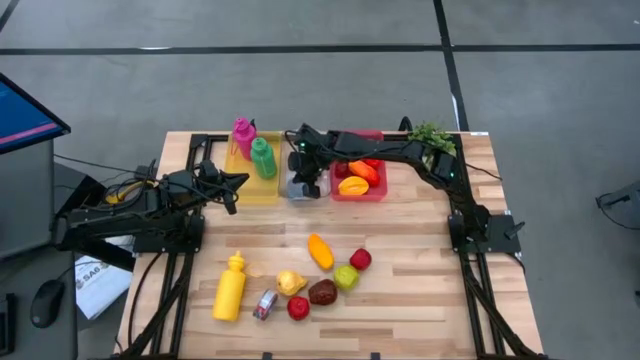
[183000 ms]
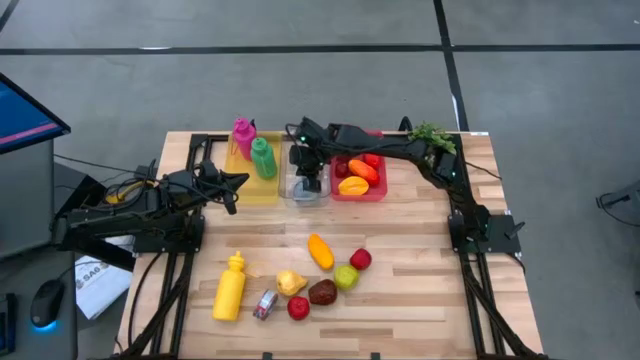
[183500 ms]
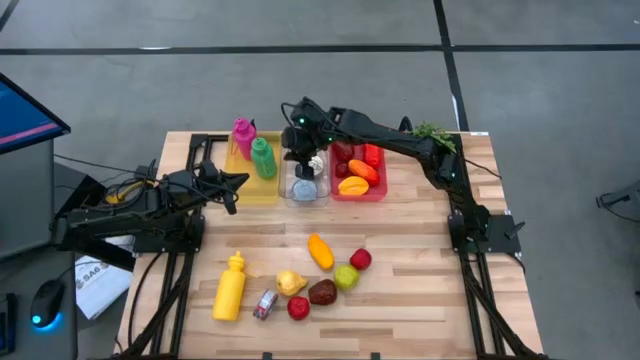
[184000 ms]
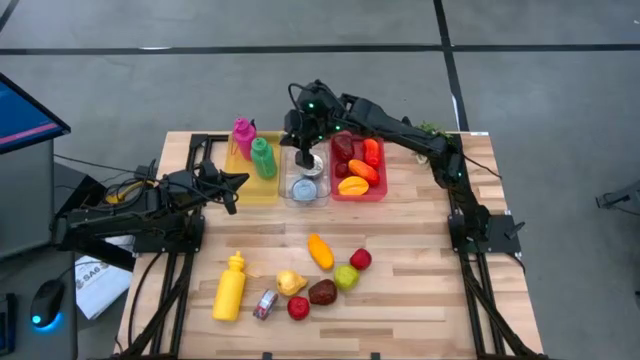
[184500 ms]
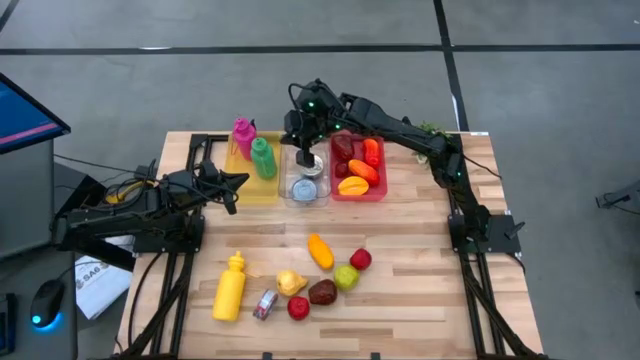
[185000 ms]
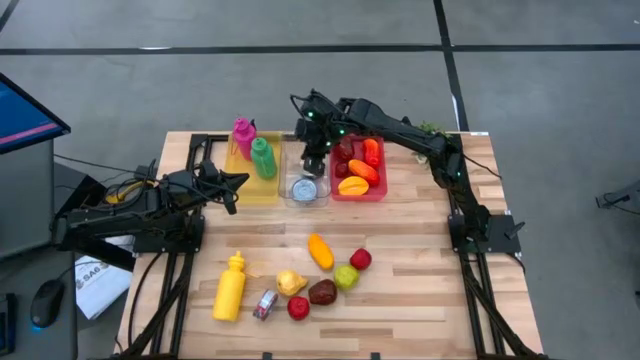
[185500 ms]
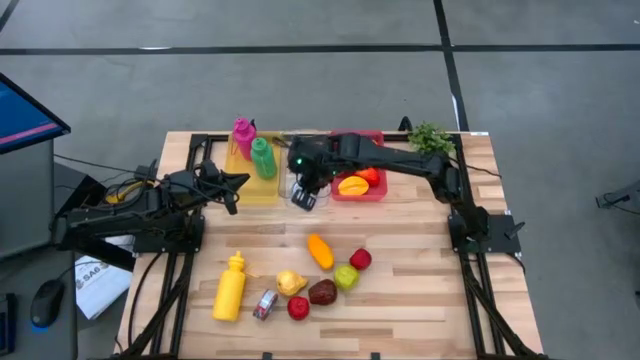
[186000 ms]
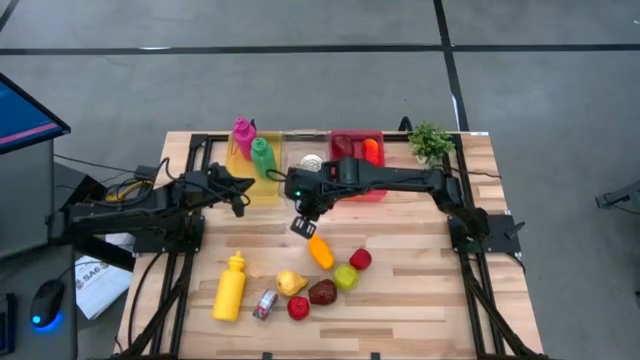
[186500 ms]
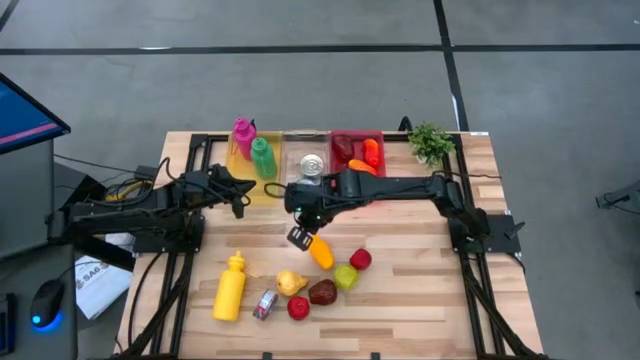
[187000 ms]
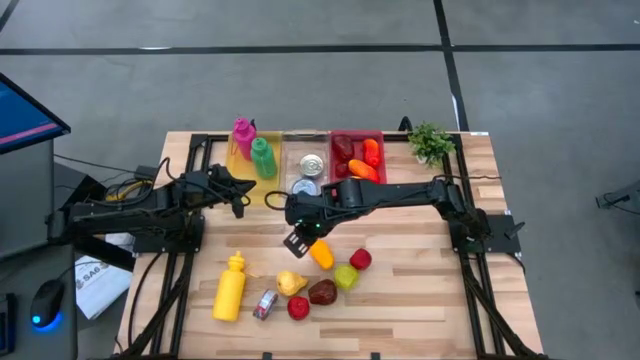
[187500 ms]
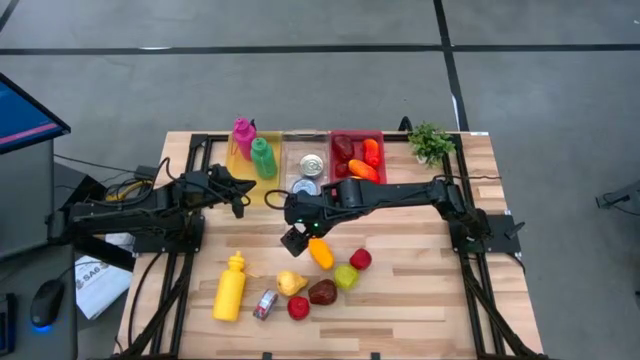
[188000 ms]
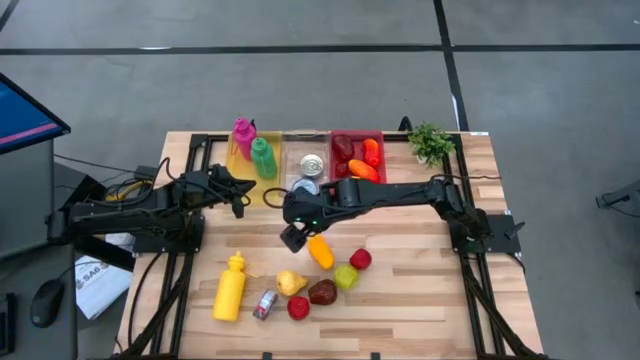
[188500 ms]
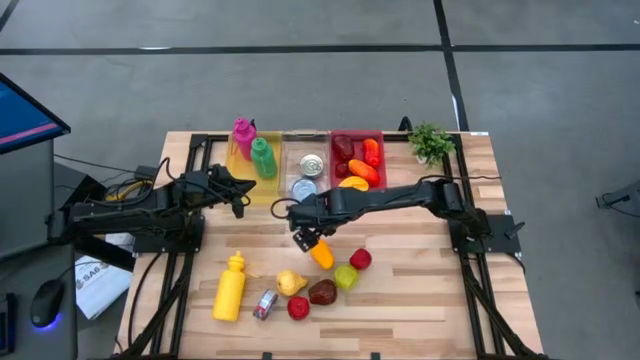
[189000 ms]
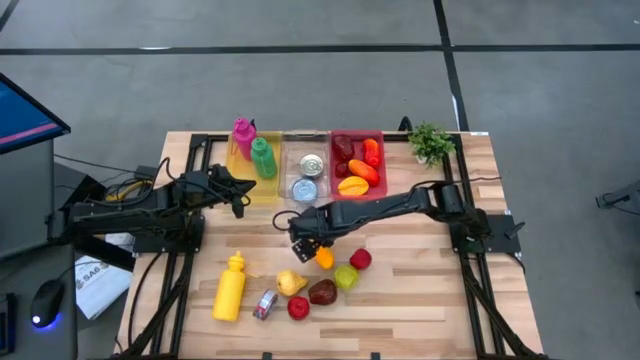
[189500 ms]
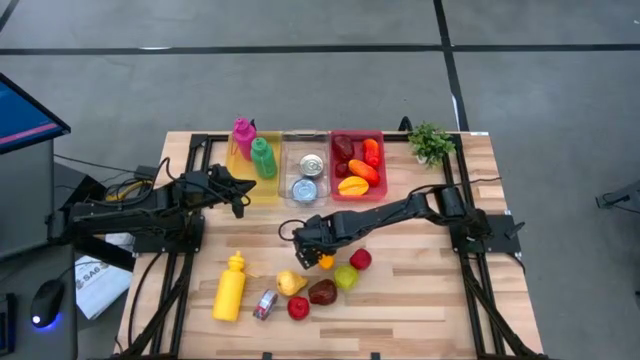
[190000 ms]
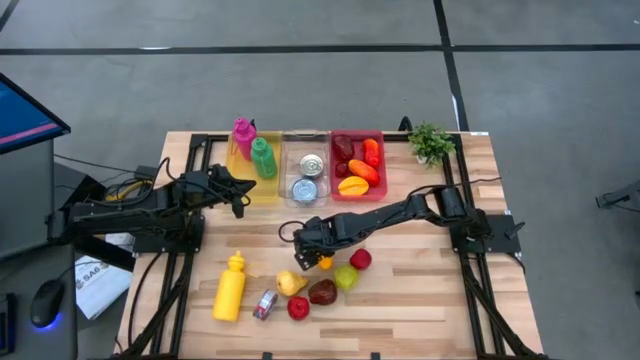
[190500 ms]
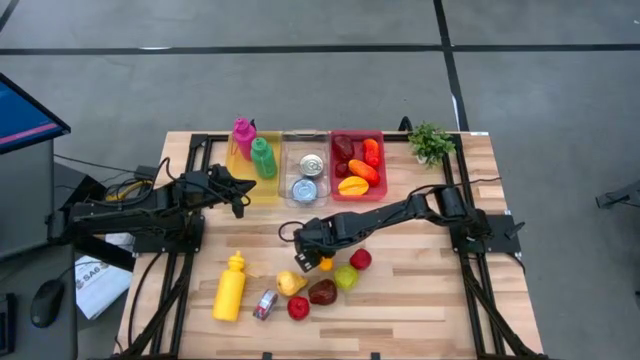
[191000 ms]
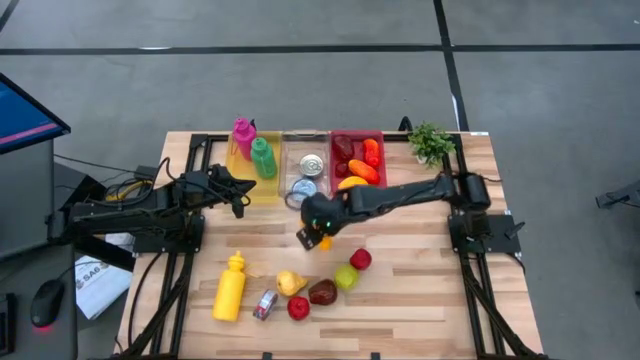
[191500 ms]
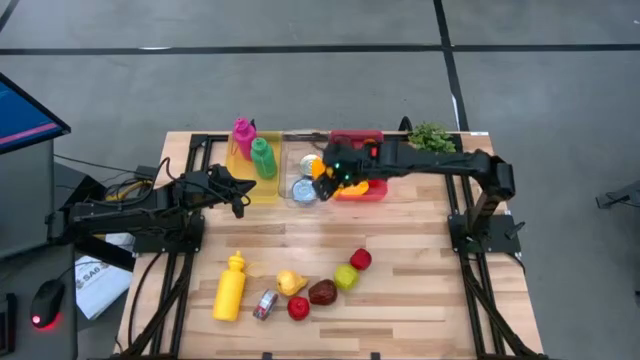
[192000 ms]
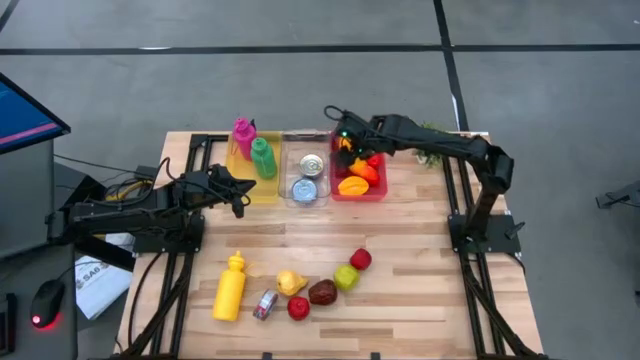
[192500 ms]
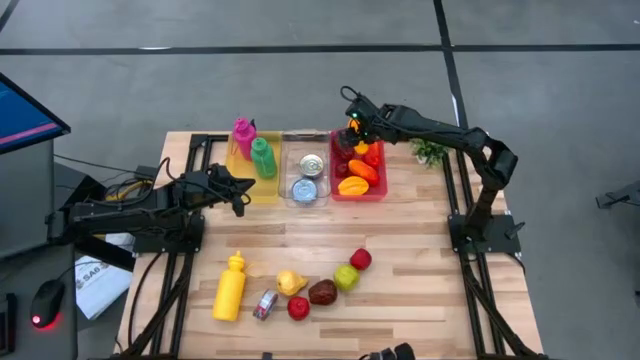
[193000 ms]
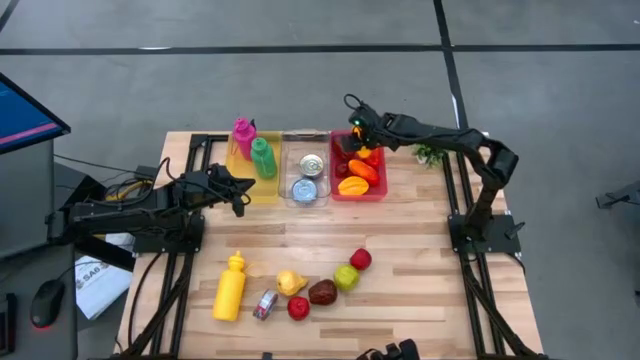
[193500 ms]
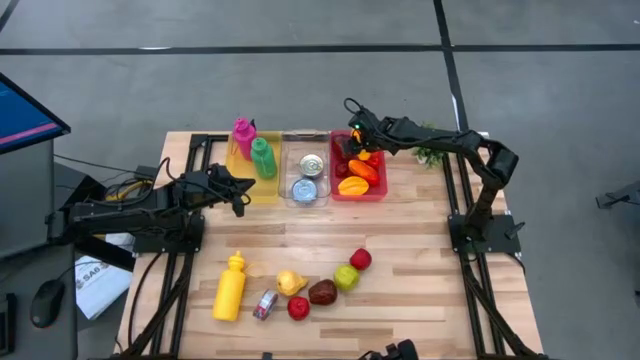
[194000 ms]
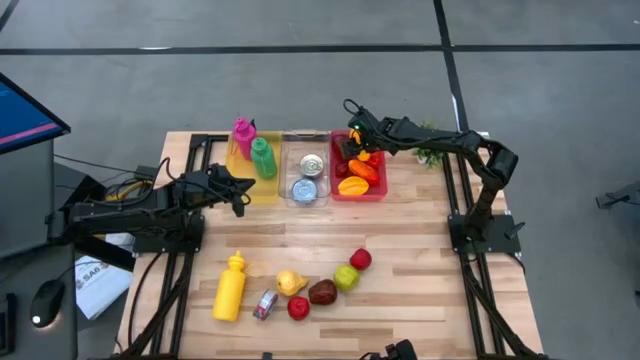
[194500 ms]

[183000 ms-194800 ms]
Task: Pick & Place Food Item
Put the yellow mango into the pink bin

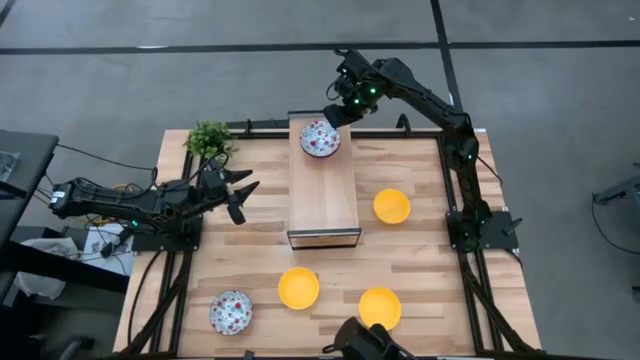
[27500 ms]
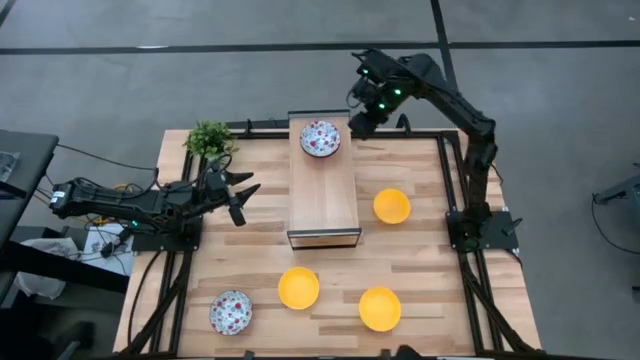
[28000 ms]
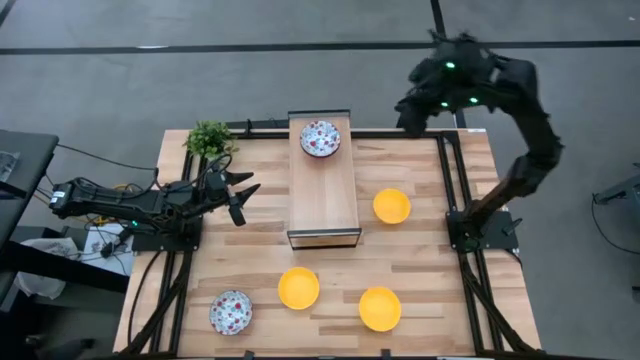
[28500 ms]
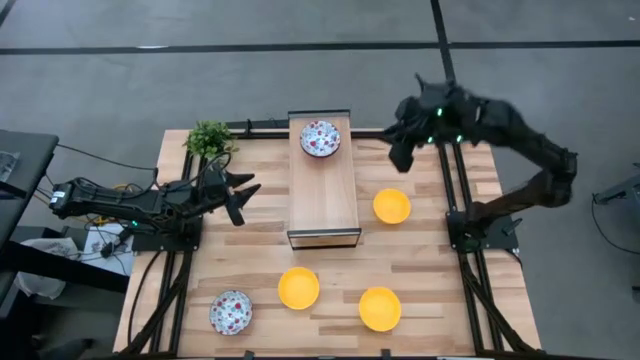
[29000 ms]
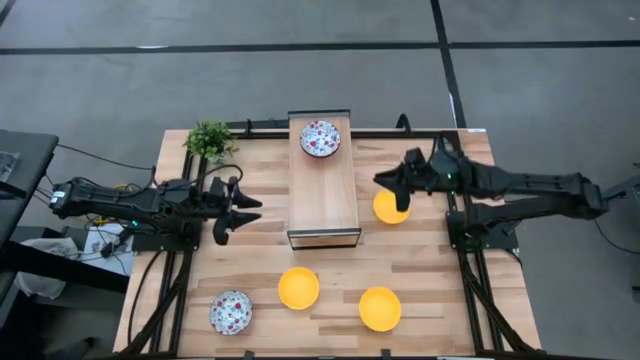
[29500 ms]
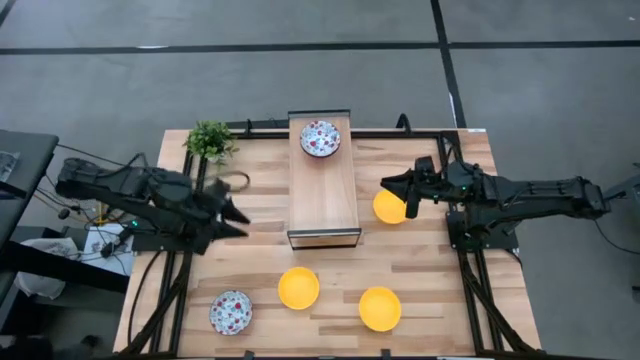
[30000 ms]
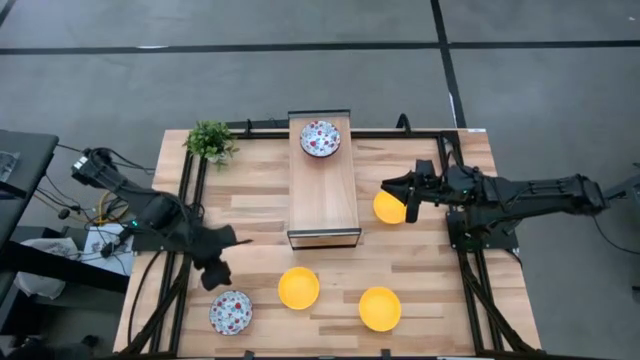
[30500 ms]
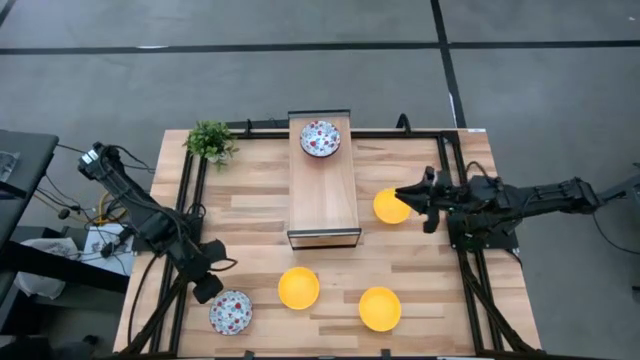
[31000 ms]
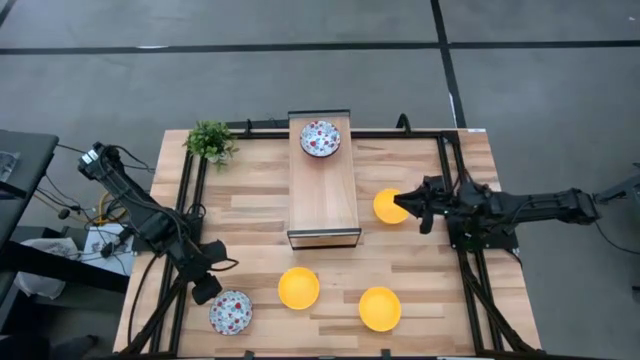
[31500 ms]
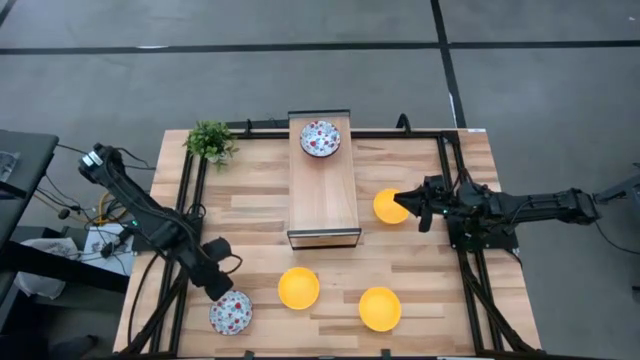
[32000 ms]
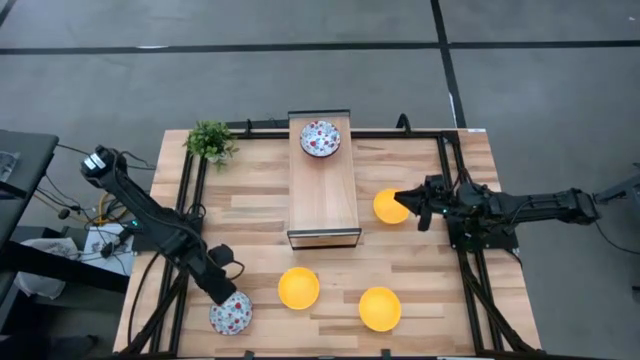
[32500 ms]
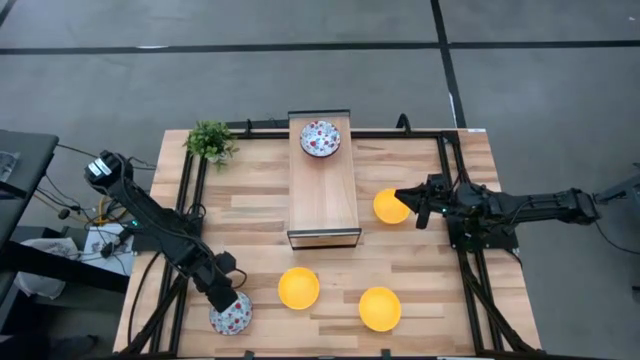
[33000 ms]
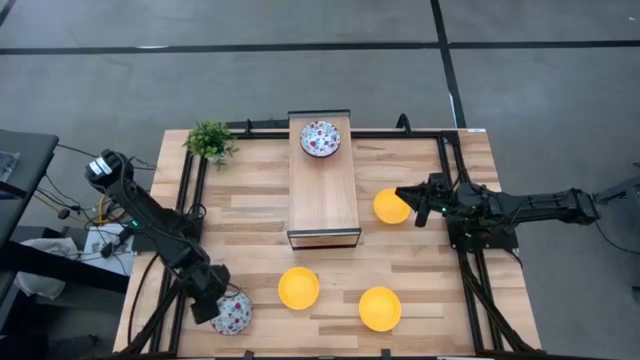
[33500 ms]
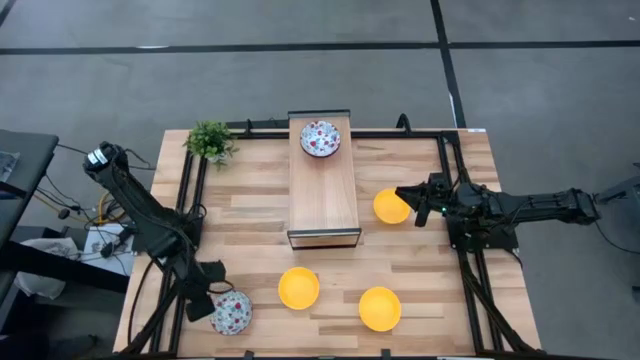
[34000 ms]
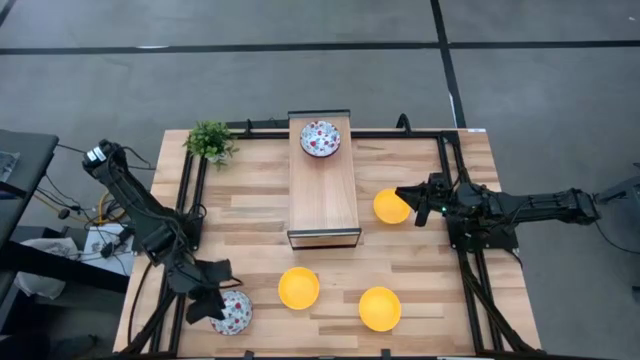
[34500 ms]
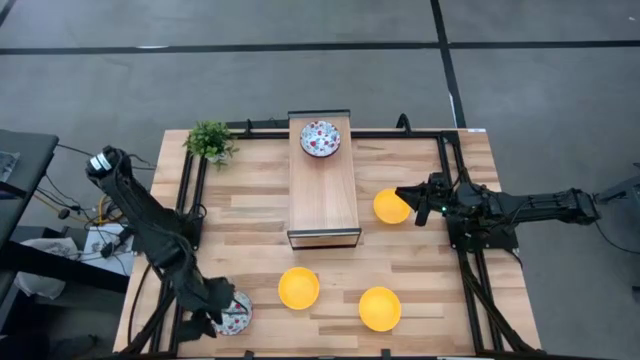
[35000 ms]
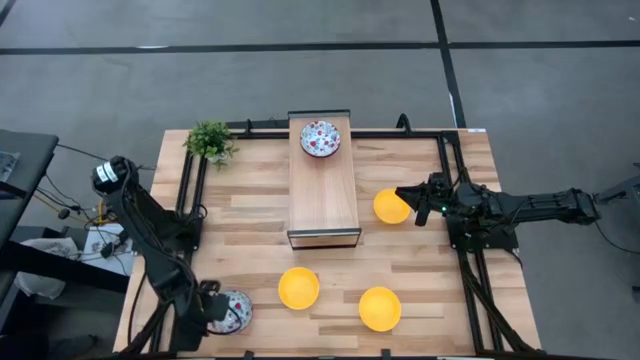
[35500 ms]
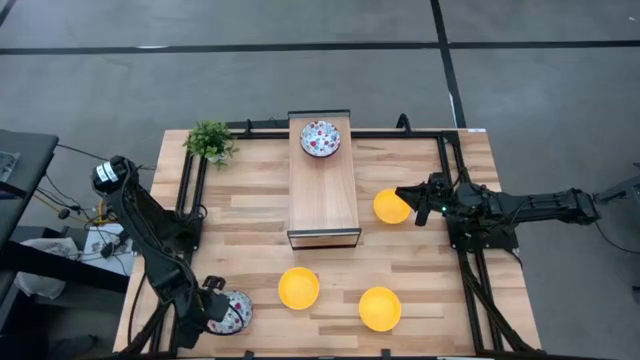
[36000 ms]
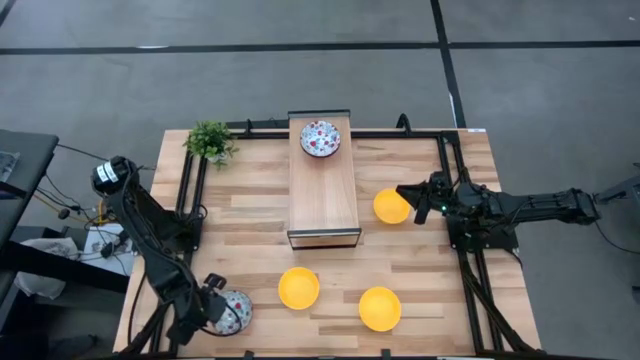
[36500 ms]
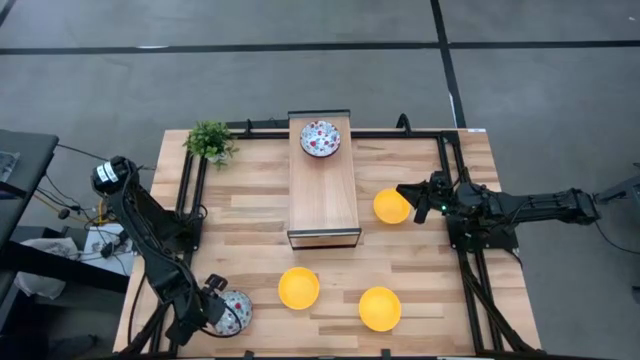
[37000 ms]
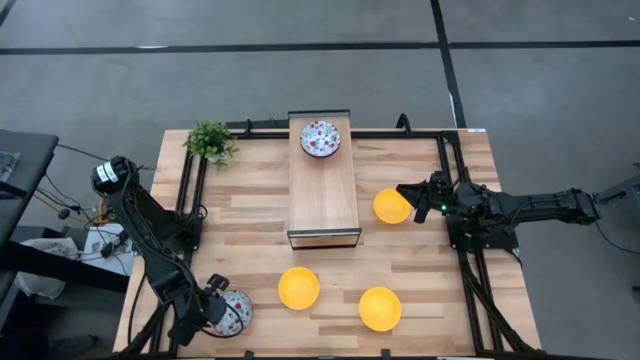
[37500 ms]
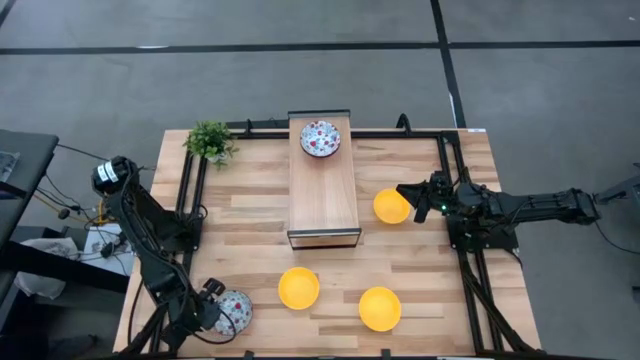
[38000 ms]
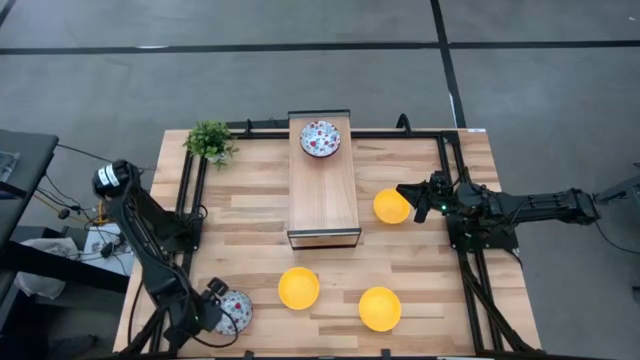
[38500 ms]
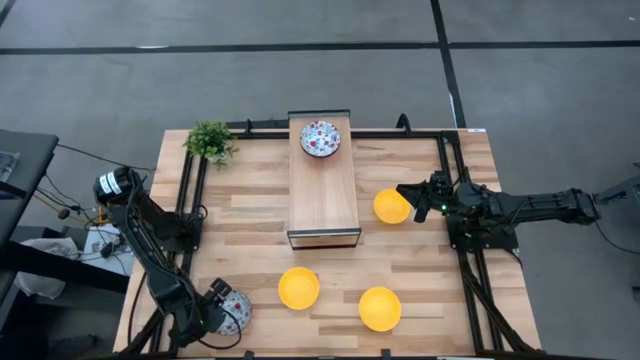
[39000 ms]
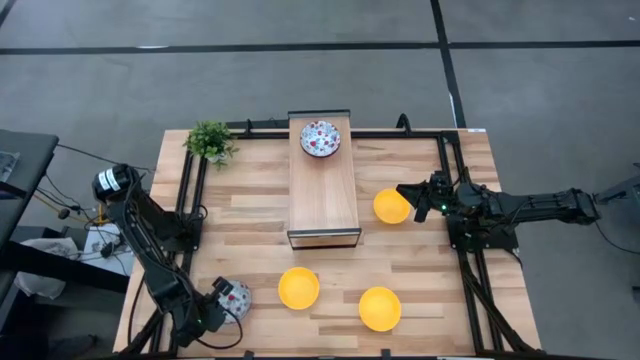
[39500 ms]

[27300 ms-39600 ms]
Task: Pick & Place Mini bowls
Stack the white patterned bowl on the other white patterned bowls on the shelf
